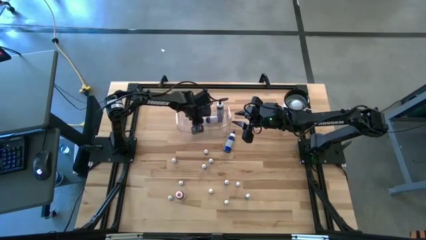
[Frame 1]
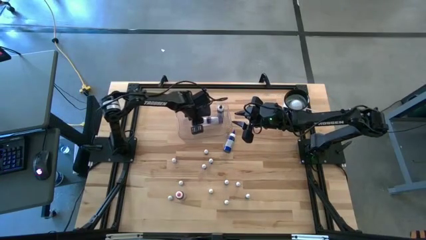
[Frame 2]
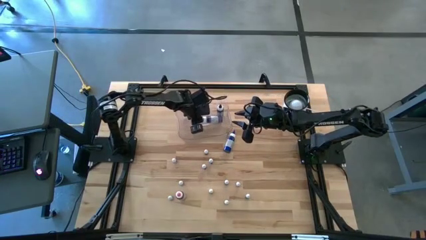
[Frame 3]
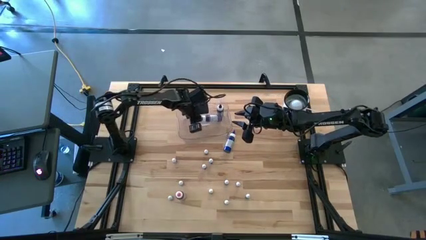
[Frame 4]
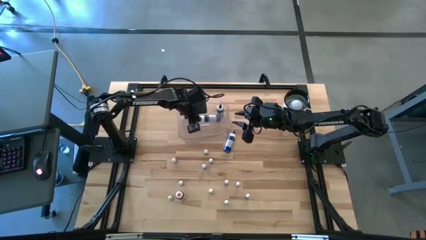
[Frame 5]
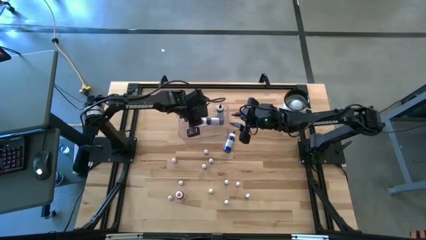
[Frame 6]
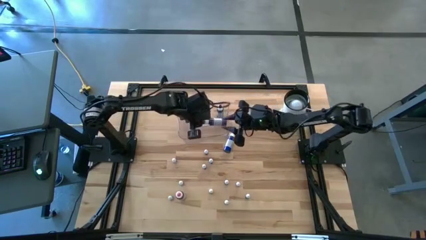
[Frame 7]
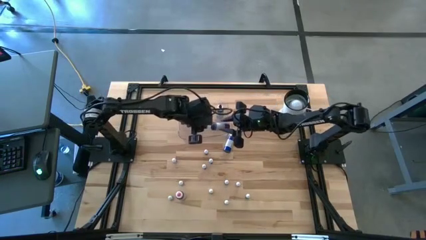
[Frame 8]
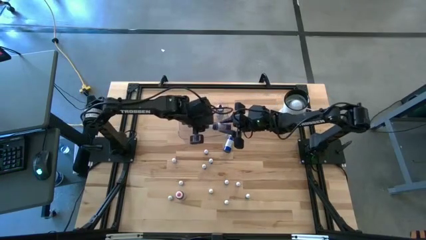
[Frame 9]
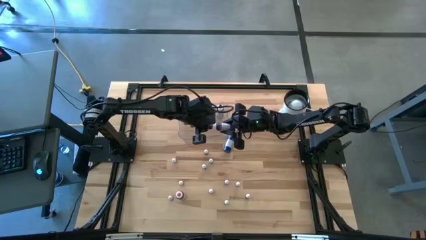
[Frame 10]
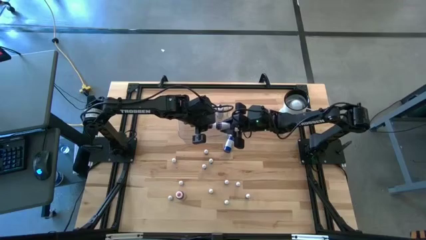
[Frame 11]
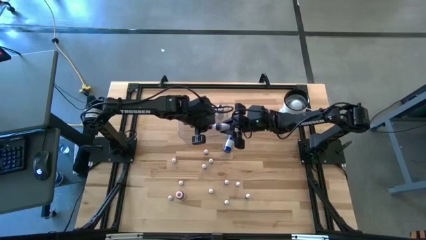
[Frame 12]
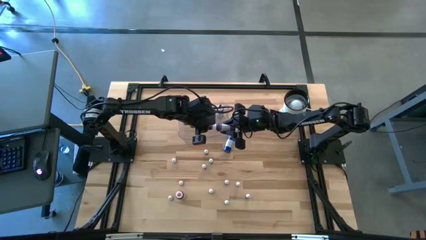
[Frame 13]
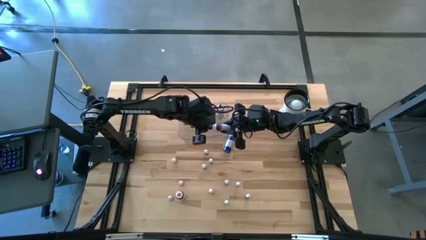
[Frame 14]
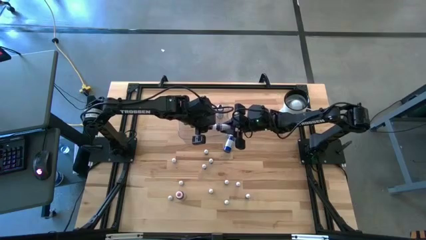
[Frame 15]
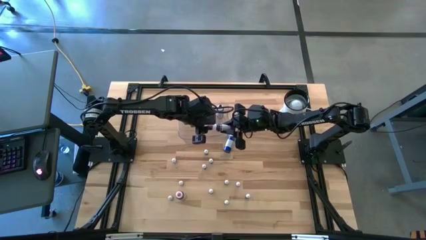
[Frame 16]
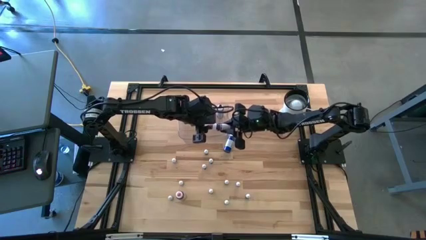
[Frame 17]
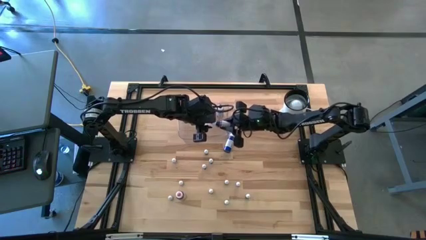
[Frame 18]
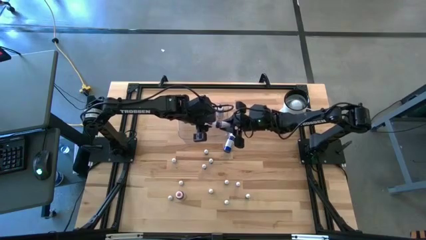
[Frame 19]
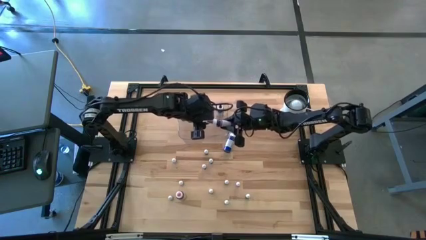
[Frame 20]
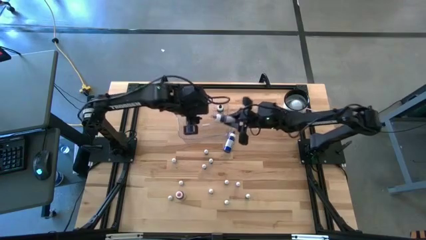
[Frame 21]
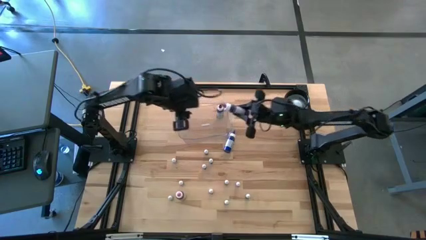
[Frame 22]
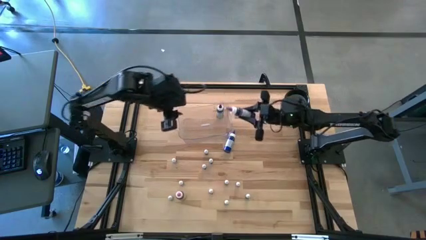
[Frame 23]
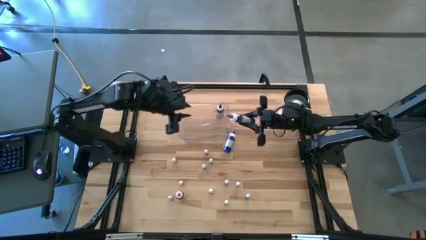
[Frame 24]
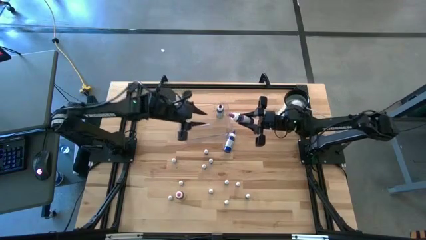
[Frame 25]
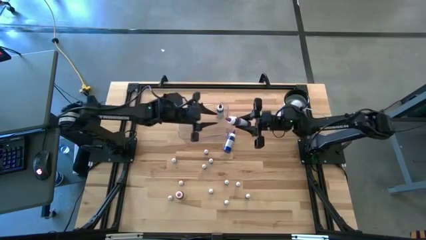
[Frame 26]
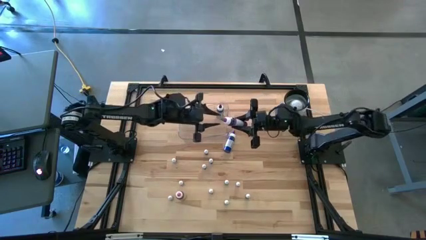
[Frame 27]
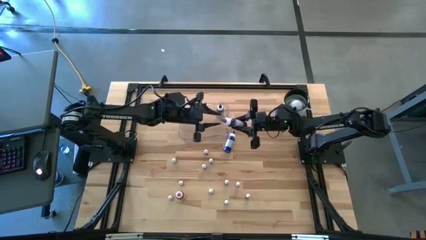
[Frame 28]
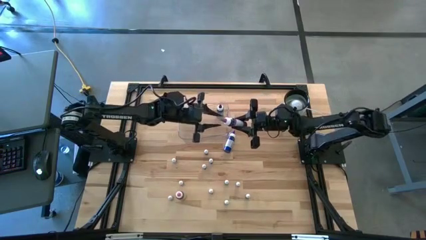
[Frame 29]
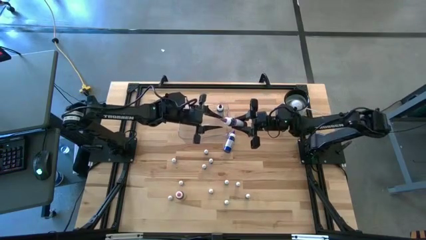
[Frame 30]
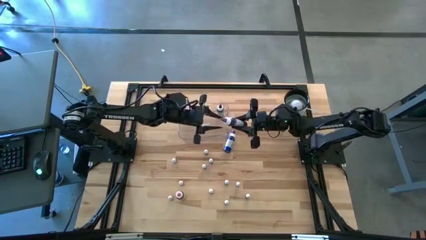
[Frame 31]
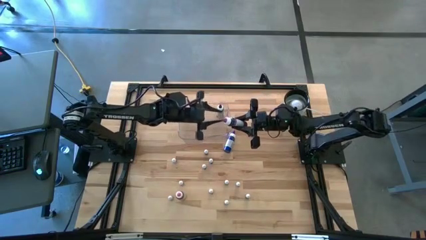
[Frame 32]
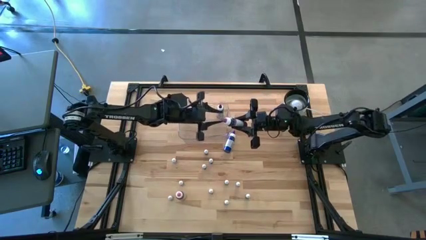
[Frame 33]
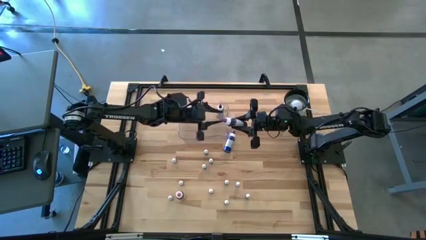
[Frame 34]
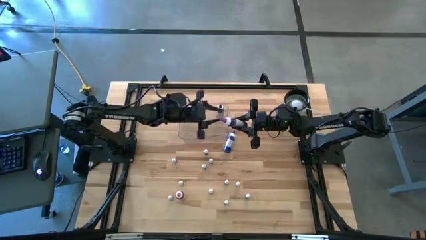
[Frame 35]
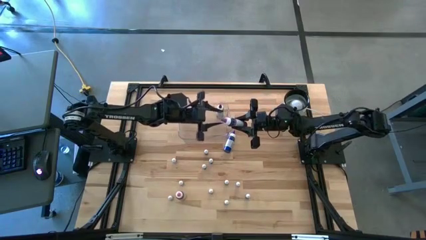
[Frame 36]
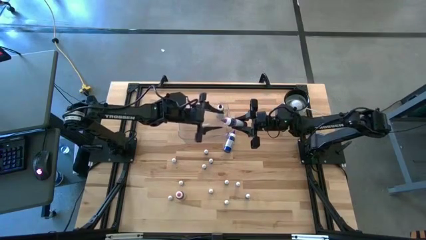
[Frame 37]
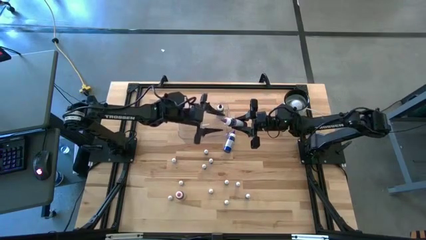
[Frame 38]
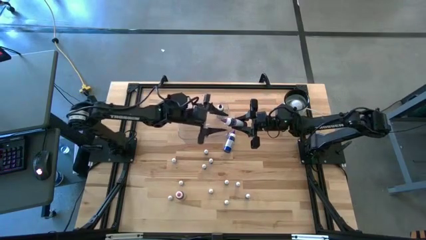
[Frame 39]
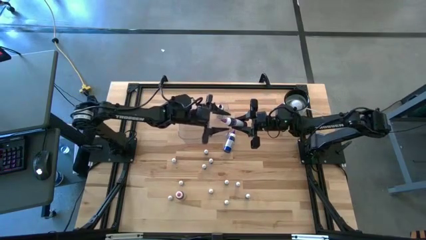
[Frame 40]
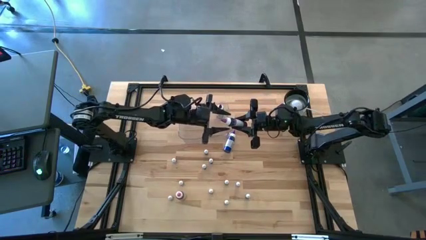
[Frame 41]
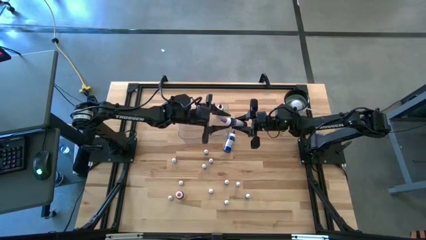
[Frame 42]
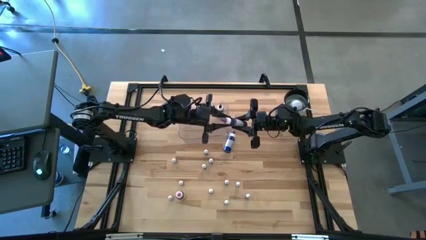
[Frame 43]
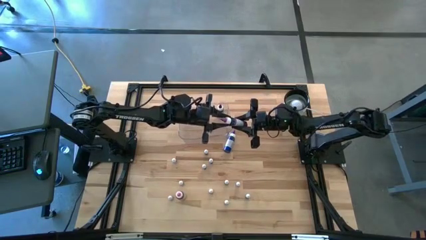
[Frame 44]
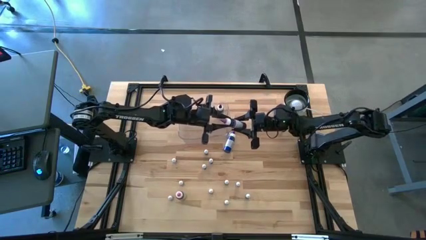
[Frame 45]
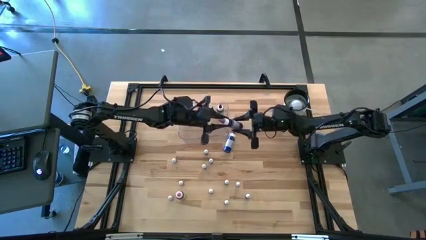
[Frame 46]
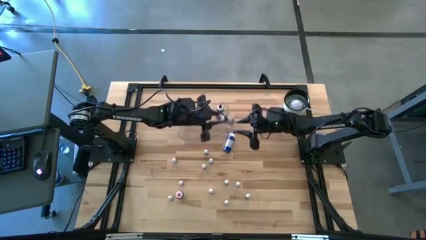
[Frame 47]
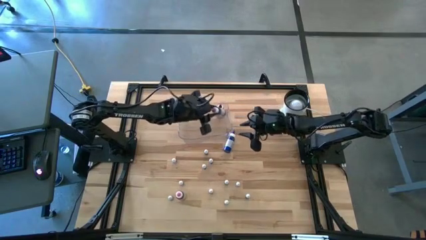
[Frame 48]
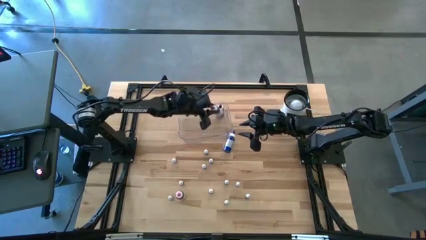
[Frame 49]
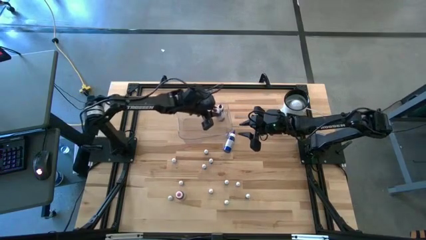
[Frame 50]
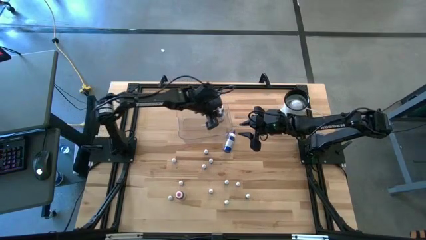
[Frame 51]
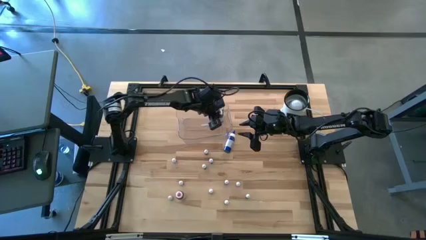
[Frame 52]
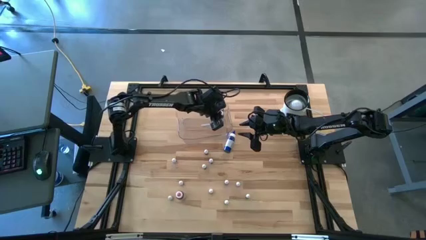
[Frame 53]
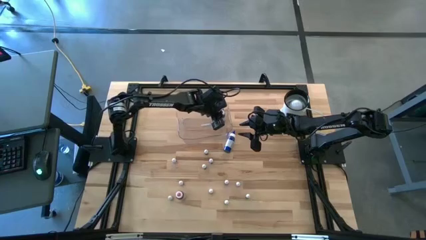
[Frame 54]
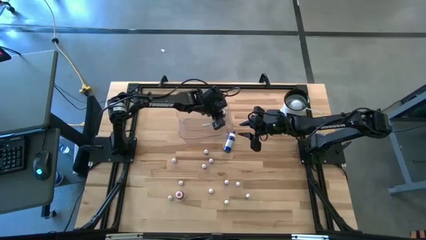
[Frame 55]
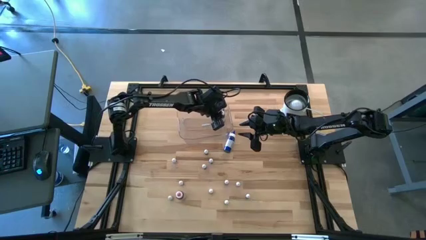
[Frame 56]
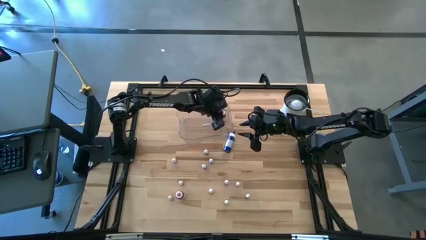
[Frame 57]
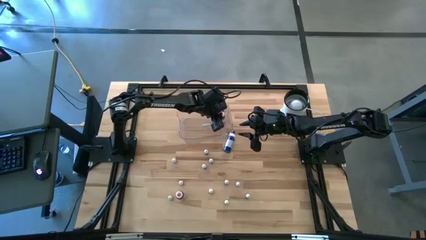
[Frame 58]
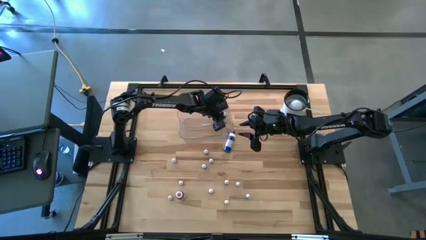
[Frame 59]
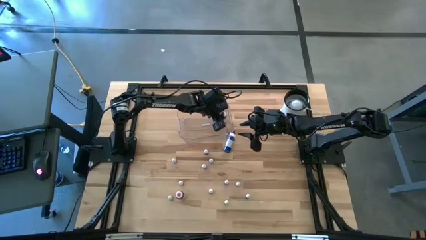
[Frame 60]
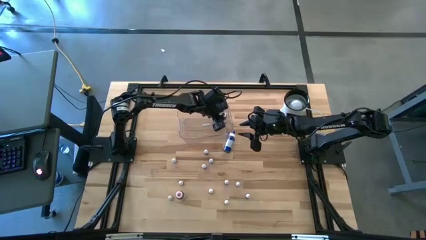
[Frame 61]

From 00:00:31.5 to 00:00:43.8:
Task: Pick & Place food coloring
Put the large purple food coloring bottle into the transparent bin

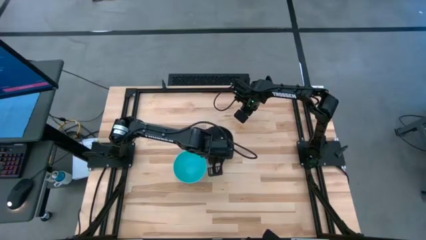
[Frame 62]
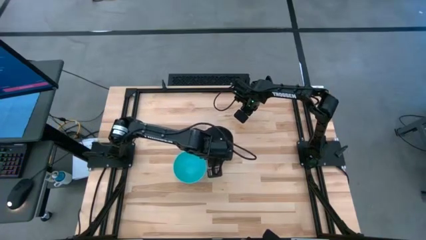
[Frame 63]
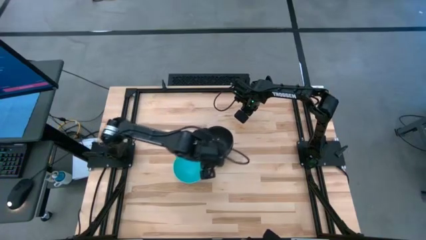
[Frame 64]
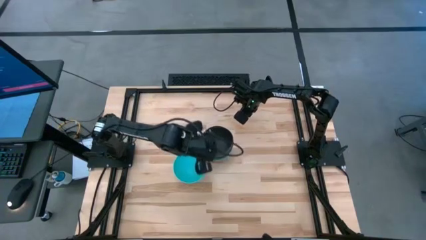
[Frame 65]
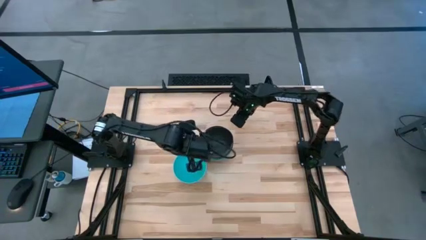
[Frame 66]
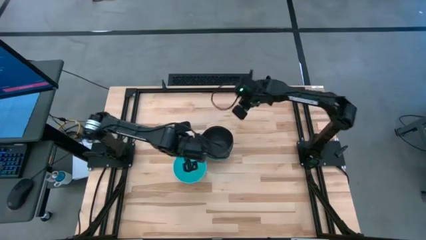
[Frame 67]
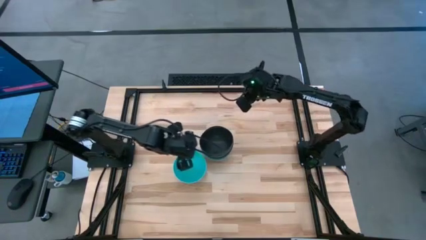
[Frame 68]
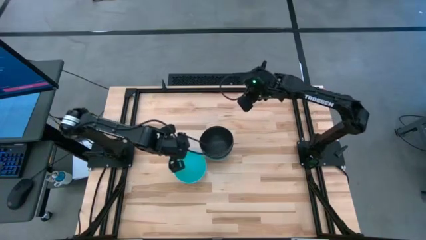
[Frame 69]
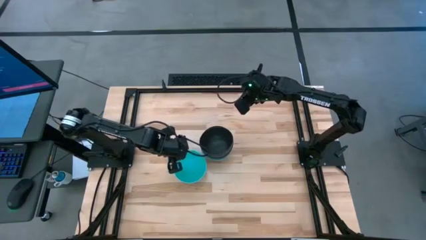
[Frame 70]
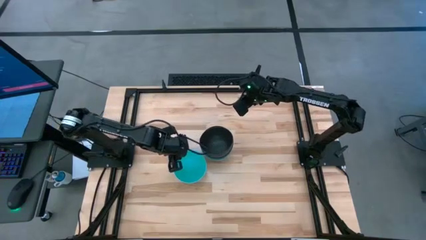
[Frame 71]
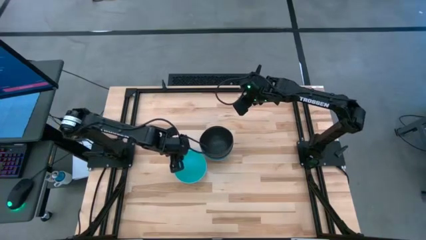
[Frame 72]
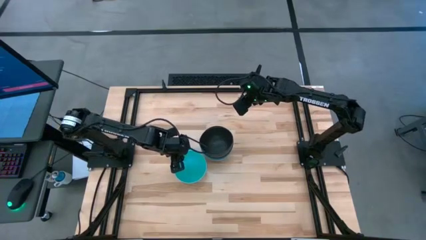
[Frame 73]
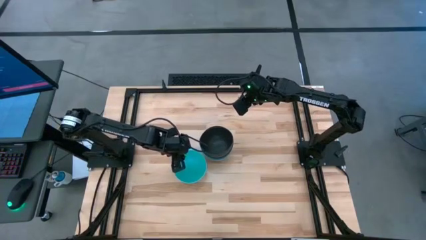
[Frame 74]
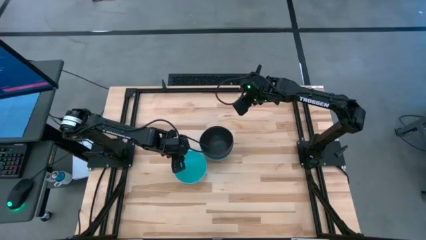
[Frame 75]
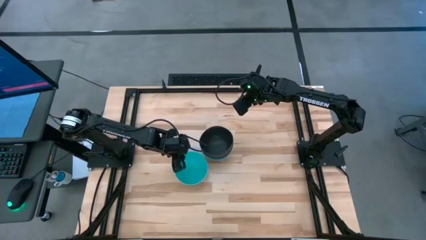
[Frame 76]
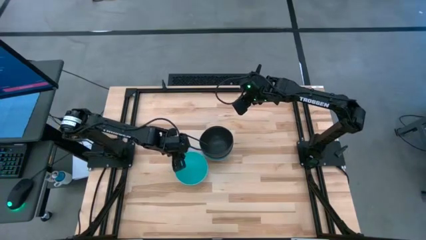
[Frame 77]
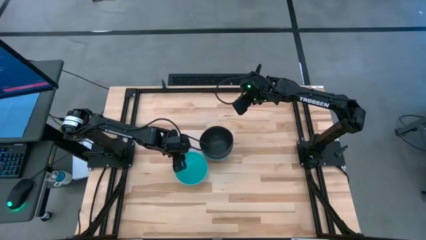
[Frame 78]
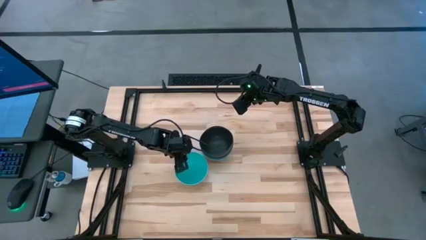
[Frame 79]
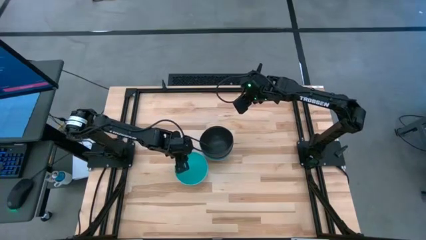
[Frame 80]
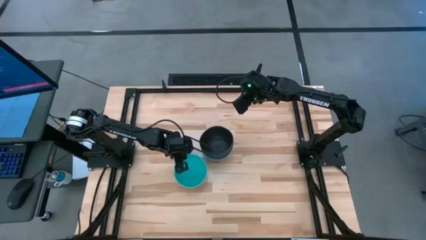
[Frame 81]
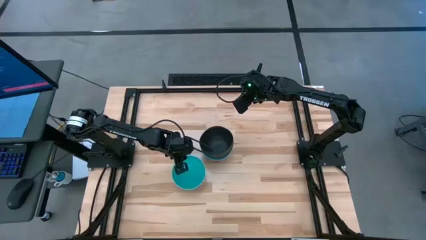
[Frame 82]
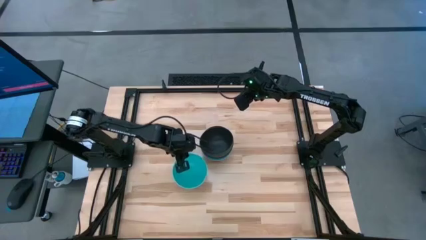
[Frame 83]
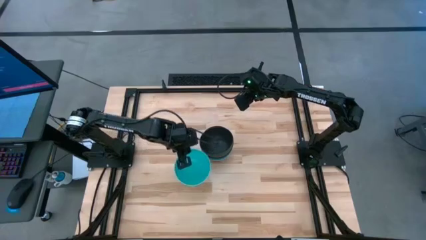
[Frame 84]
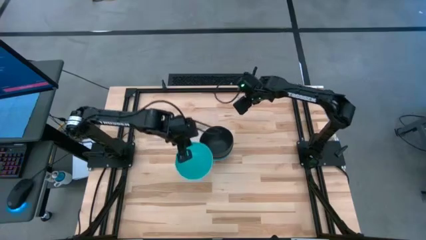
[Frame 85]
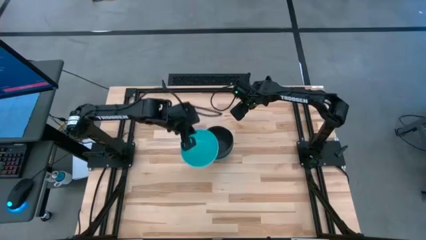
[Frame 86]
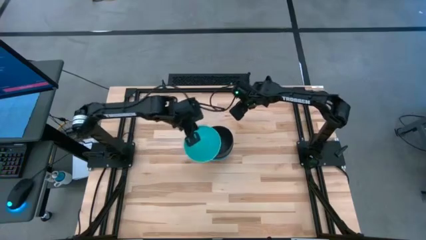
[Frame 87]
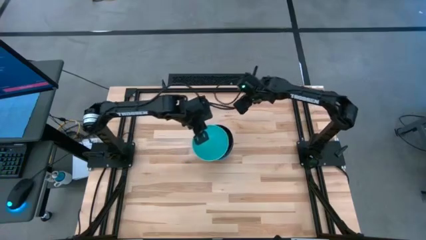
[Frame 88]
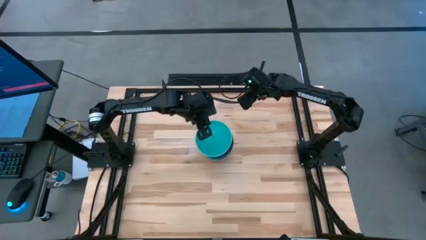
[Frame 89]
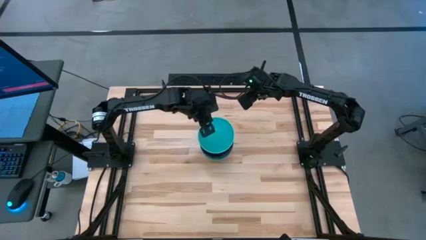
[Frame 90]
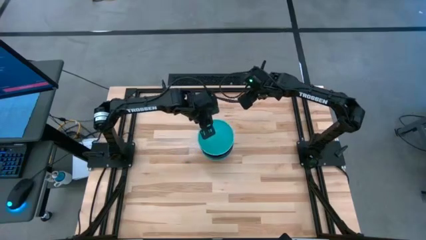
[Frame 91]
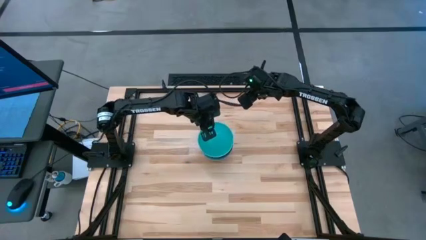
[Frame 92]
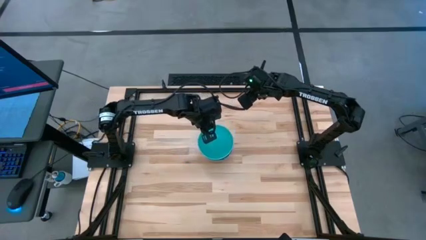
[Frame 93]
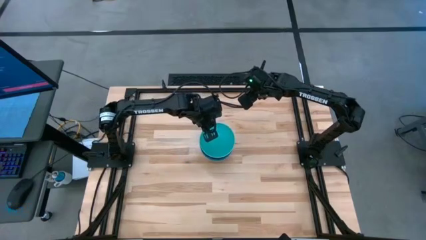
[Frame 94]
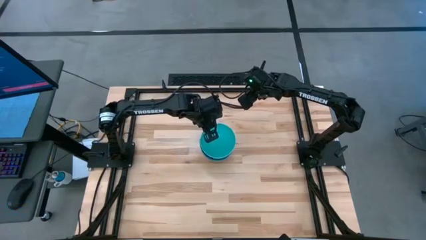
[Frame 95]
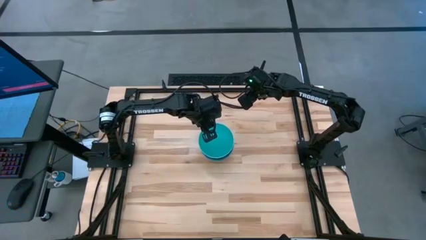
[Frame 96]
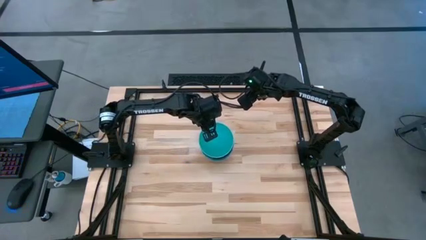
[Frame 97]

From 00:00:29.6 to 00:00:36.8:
Task: Nest bowls inside each other
Stack the blue bowl on top of the black bowl
